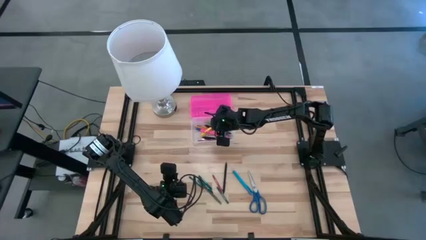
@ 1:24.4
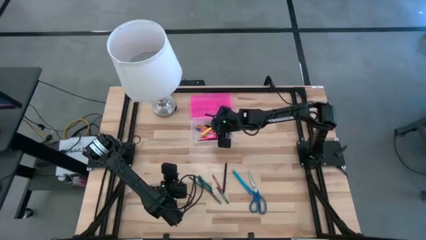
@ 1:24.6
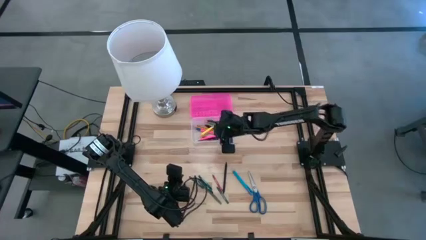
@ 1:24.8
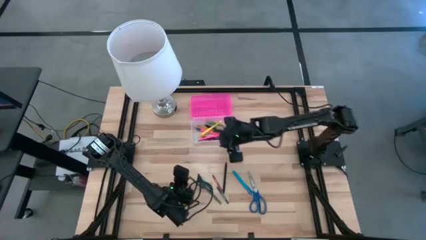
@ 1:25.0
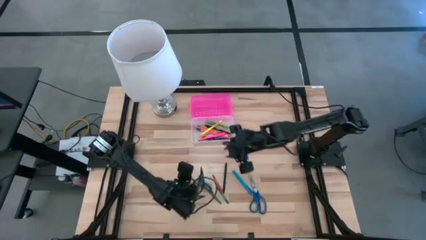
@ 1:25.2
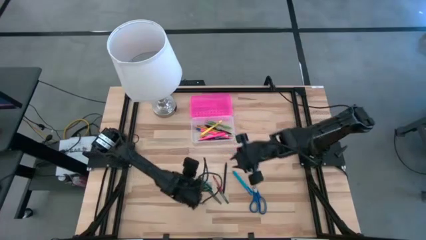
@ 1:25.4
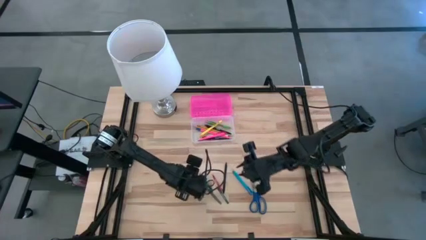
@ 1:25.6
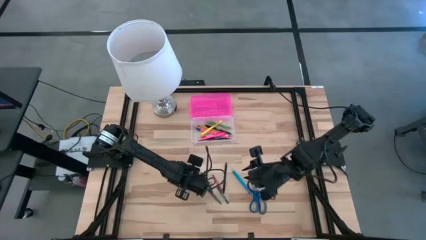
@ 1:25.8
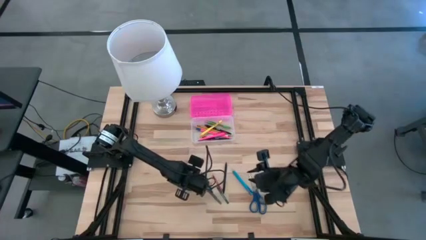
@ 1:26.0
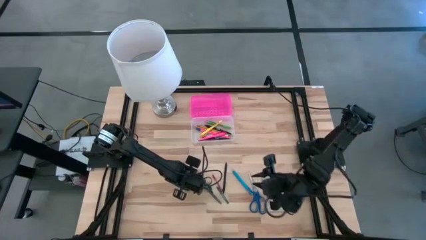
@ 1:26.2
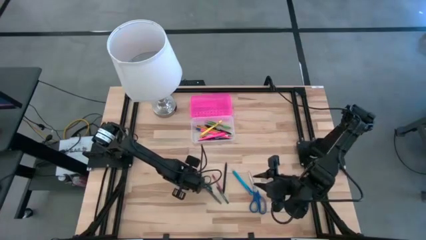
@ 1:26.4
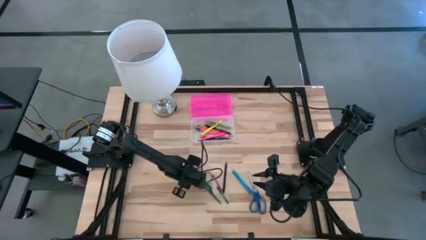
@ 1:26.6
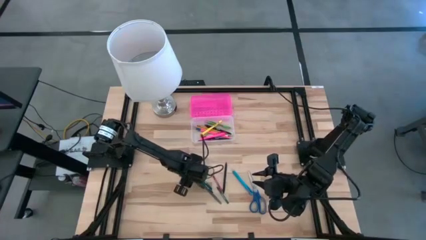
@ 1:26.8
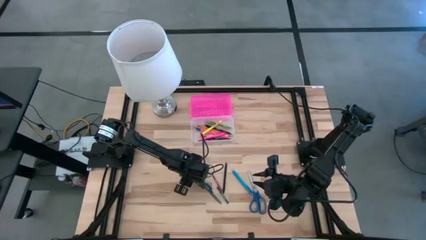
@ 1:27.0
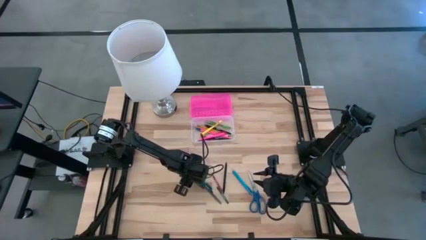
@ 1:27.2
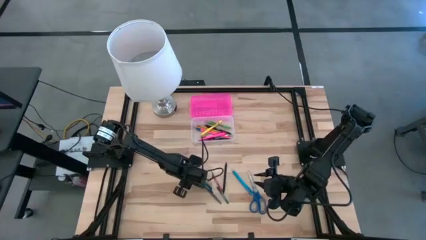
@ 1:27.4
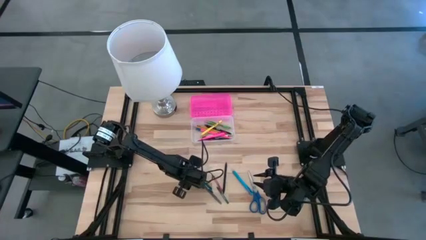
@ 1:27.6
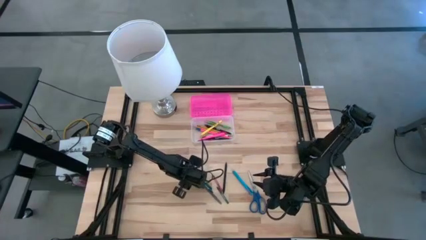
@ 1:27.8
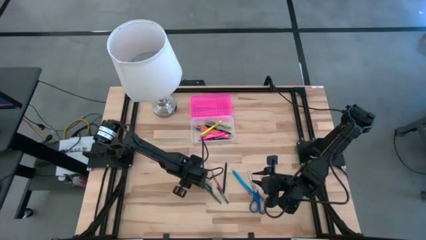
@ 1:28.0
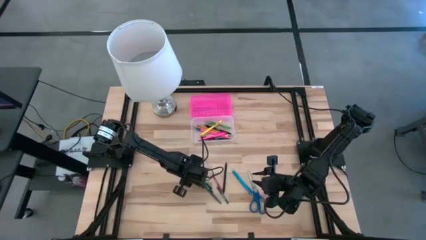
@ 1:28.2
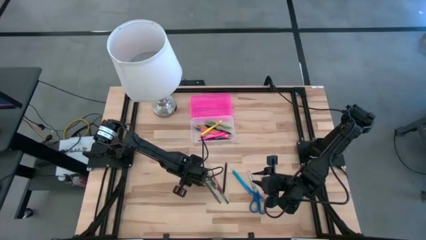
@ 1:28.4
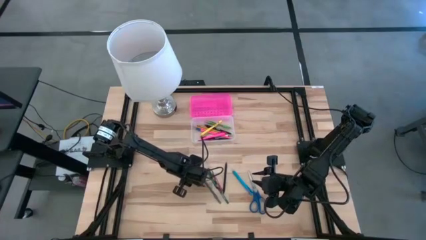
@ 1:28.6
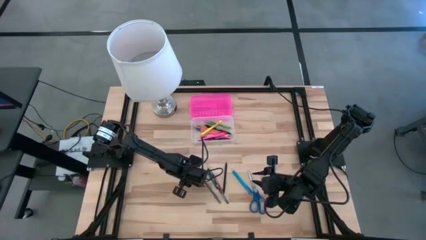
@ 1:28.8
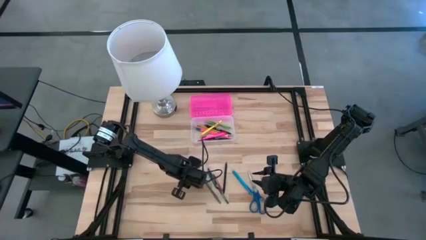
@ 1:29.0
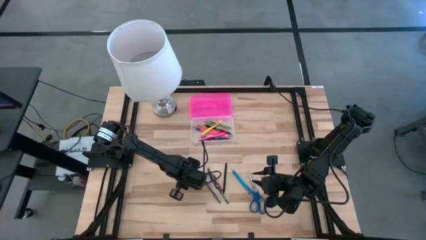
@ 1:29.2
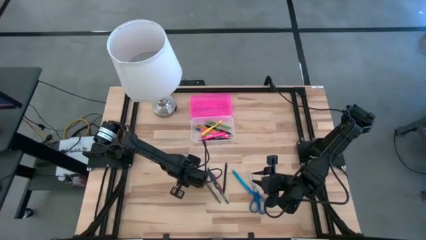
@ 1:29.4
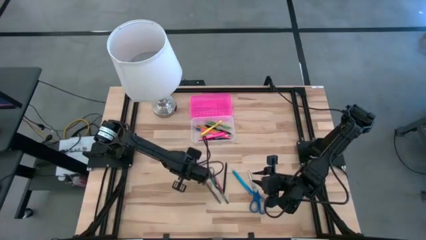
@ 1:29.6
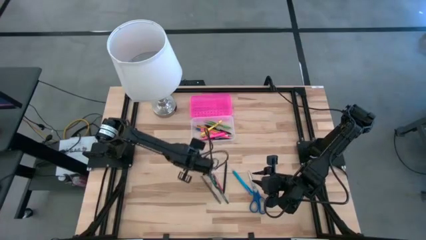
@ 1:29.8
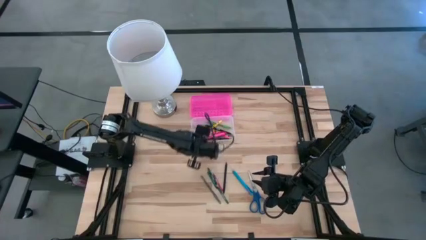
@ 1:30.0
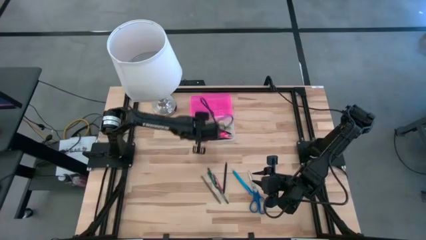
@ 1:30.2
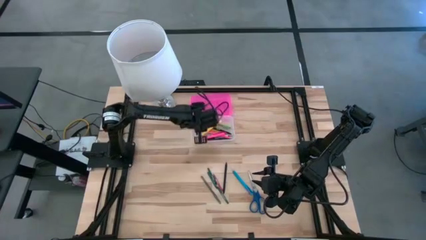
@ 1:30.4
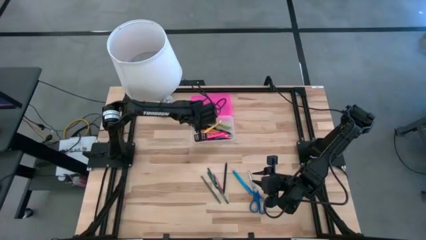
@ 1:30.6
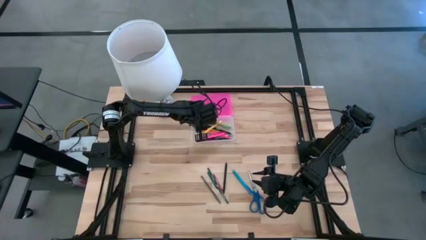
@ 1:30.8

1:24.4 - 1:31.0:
Task: Pick & place school supplies into a supply box
Put the green crayon into the pink supply box

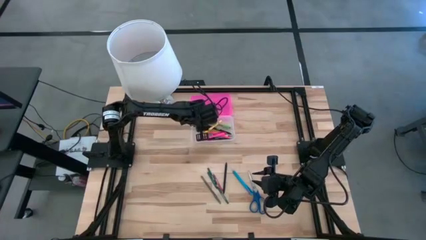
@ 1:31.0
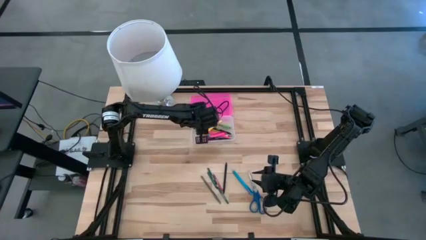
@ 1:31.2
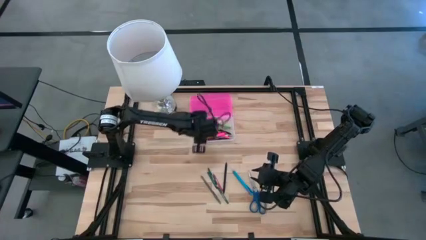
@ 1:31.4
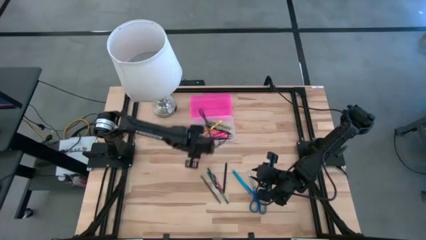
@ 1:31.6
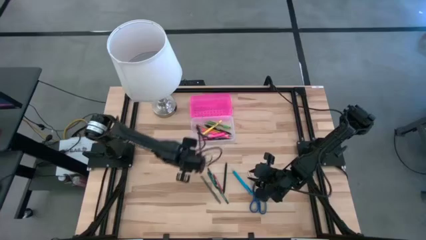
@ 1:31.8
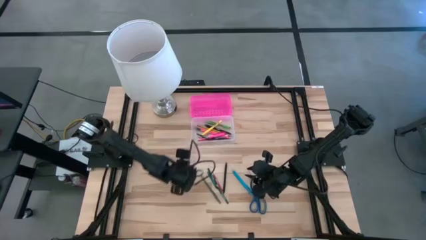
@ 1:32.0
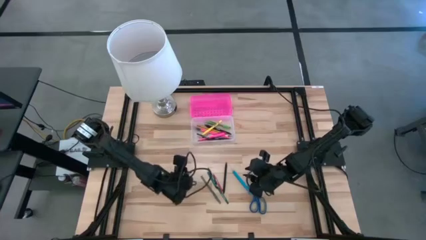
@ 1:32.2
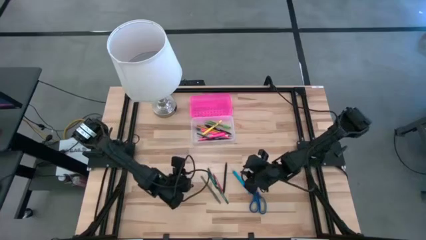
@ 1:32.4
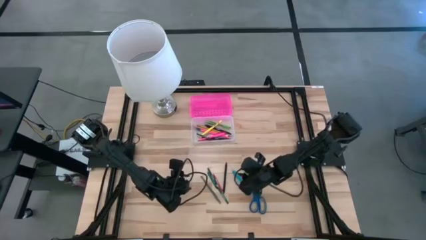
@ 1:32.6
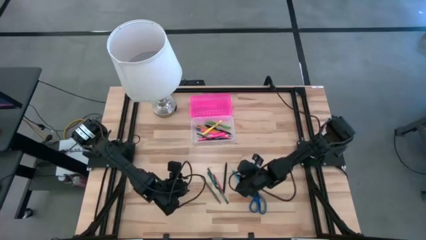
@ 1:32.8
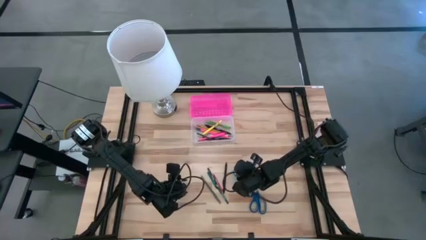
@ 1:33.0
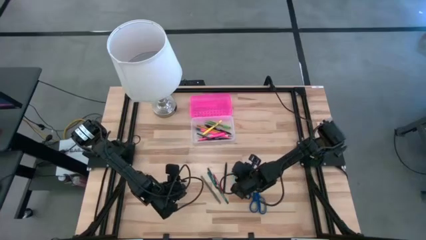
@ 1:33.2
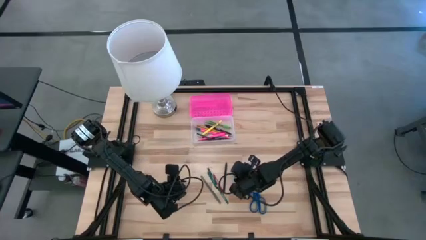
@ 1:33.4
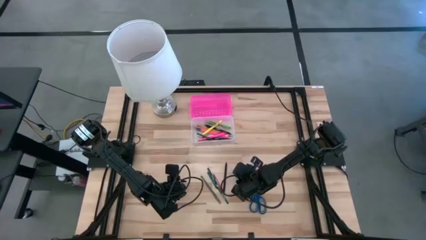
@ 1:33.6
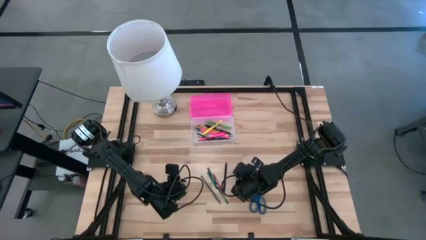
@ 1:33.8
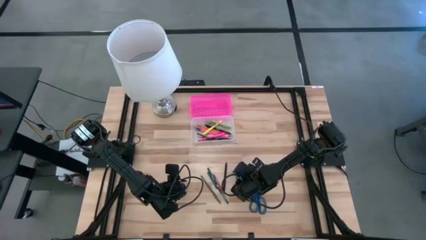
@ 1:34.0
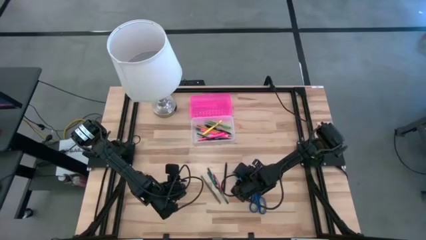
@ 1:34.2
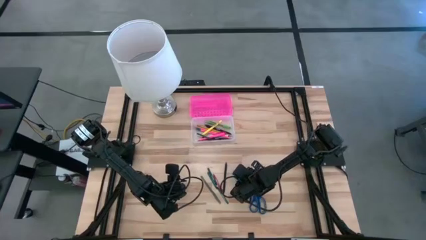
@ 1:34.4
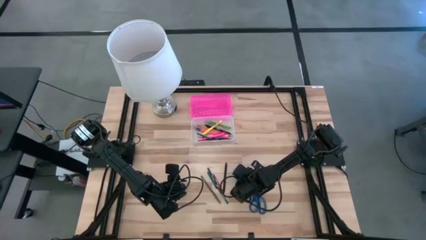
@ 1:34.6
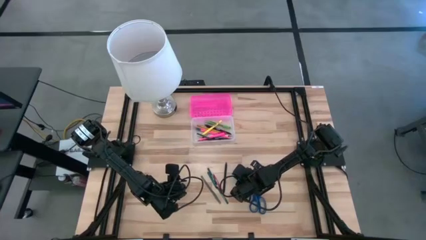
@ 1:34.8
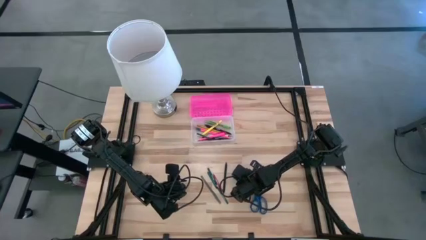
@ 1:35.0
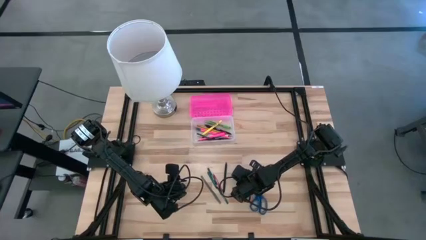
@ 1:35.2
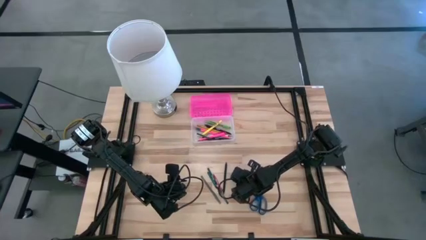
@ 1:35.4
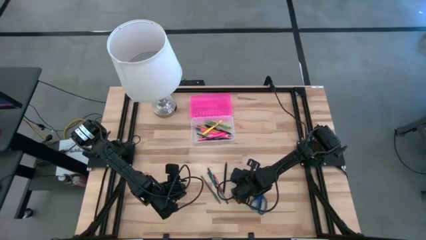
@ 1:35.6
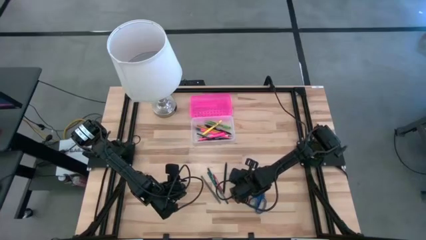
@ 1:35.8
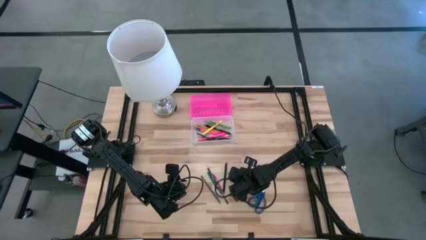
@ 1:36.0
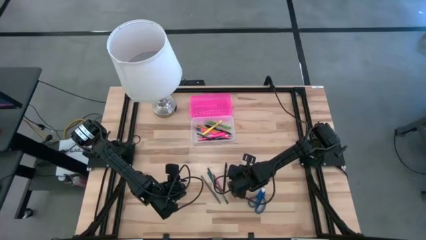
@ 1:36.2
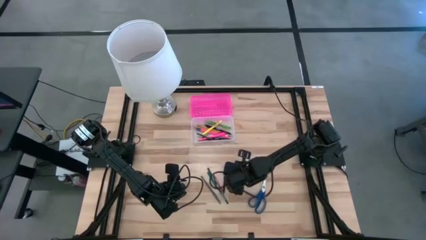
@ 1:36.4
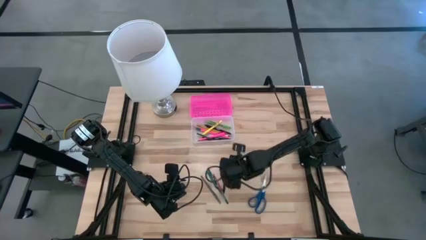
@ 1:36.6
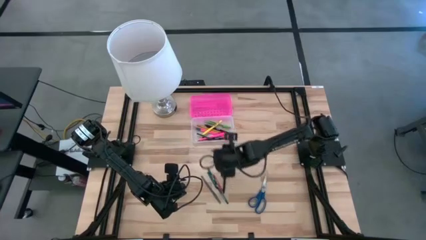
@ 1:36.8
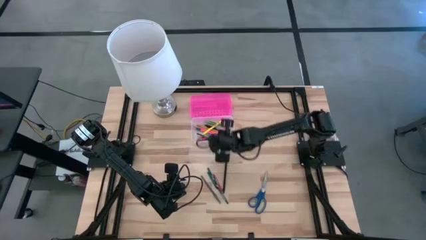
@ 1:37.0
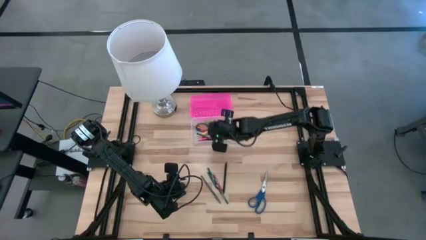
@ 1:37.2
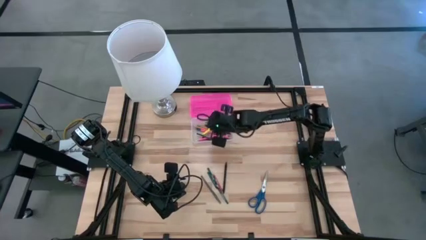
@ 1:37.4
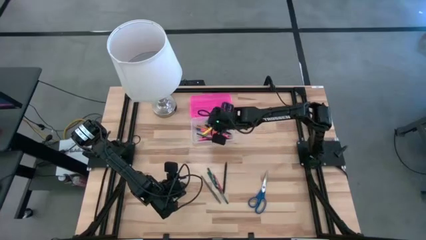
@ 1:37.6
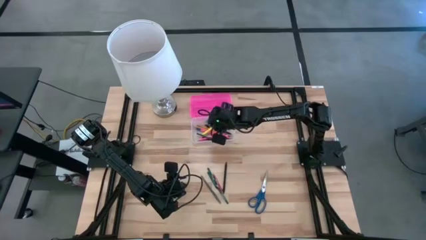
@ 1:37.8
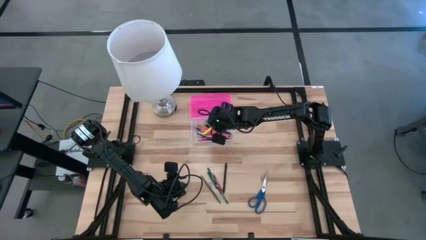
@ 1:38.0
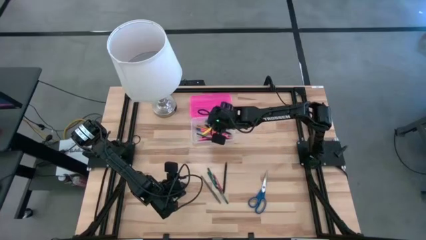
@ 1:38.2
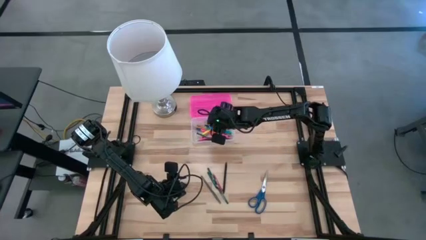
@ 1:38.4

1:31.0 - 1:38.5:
Put the blue pen into the pink supply box

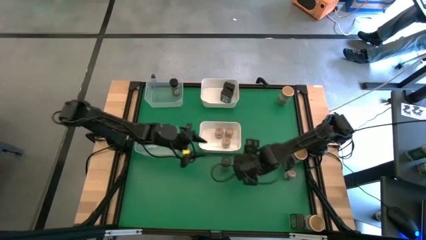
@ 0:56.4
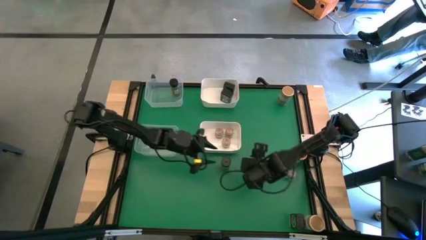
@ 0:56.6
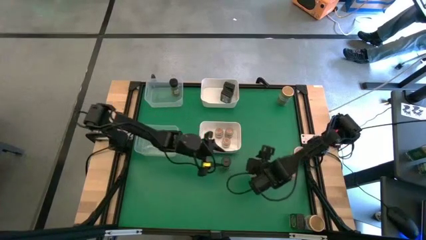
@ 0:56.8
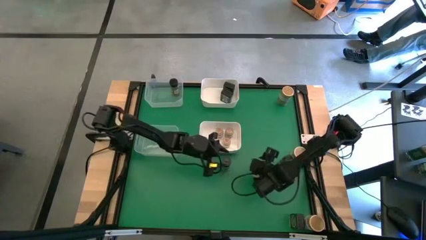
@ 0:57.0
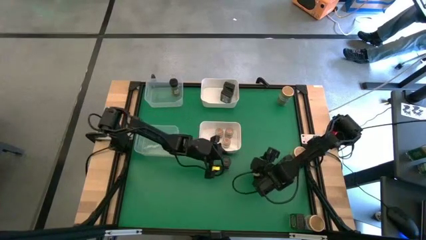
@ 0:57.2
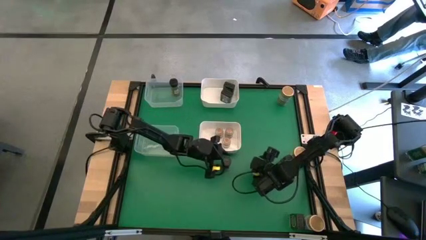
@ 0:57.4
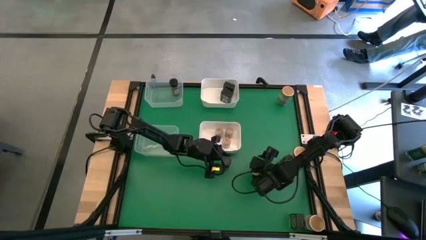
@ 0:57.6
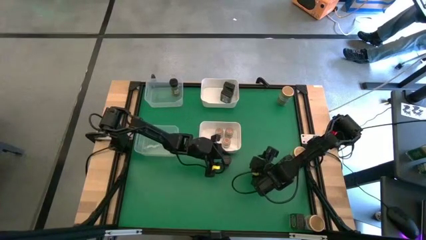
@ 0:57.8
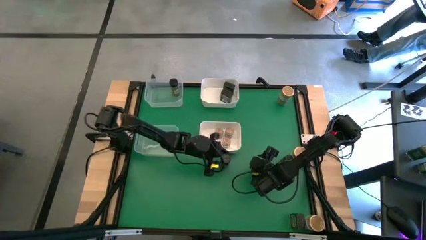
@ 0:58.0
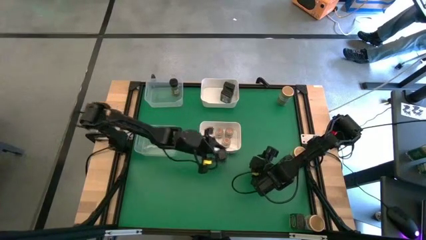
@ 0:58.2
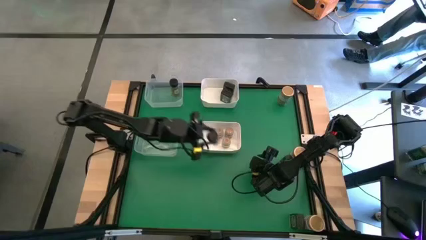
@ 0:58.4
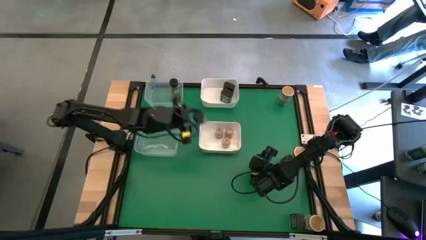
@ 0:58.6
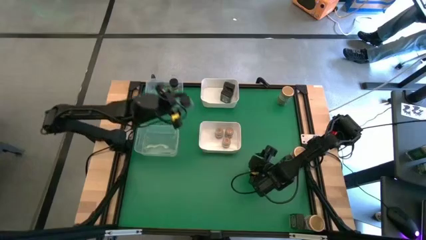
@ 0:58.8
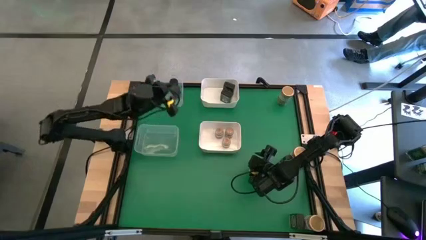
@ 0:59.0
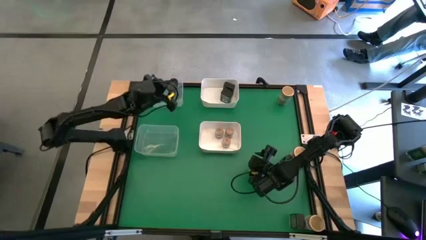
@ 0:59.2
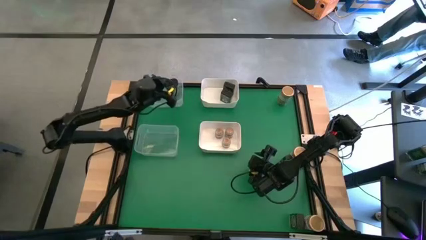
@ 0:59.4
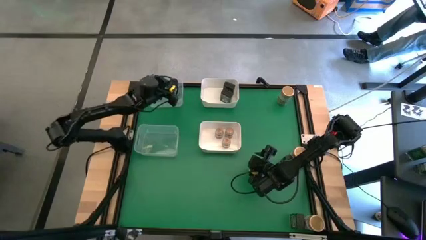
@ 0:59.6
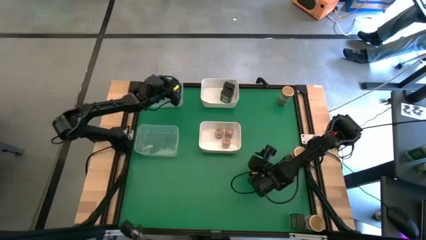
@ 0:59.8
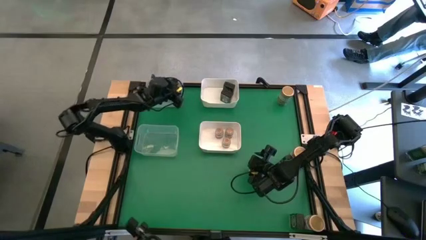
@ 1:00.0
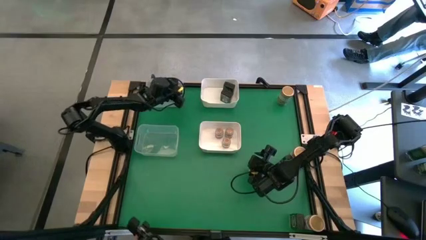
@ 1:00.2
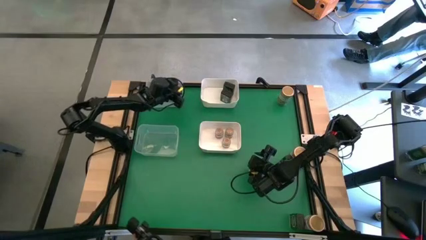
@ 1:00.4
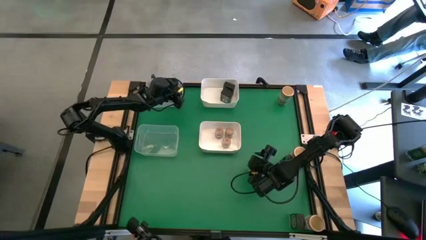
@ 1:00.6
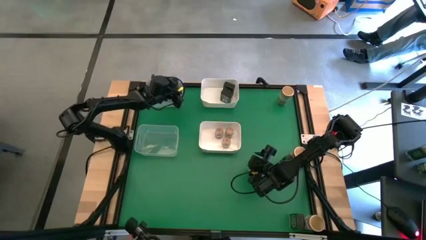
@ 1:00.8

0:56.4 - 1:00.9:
Task: Sort spices by type
Put the green seasoning bottle into the top transparent bin
